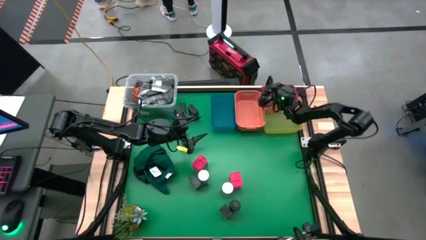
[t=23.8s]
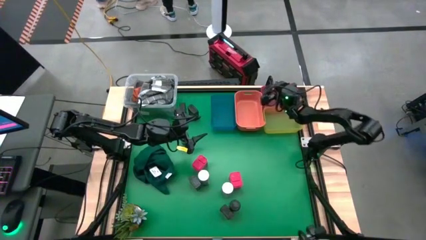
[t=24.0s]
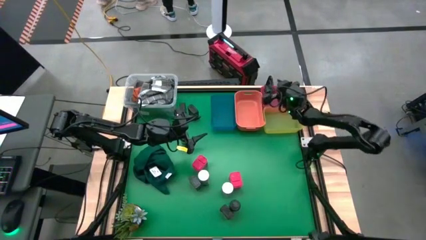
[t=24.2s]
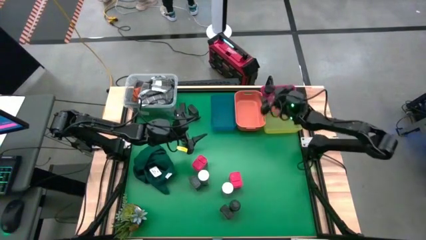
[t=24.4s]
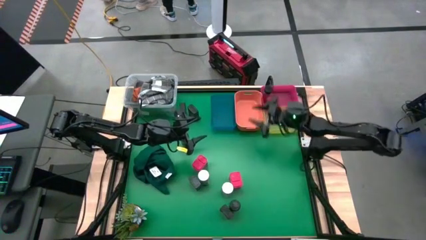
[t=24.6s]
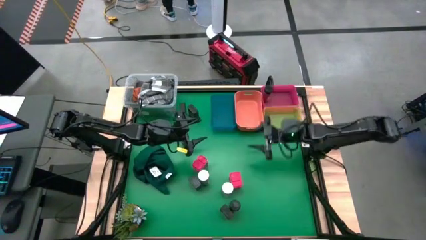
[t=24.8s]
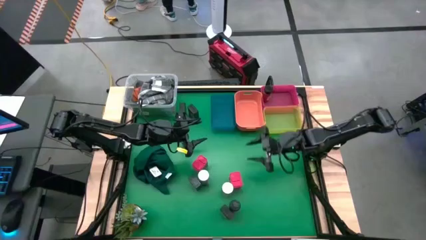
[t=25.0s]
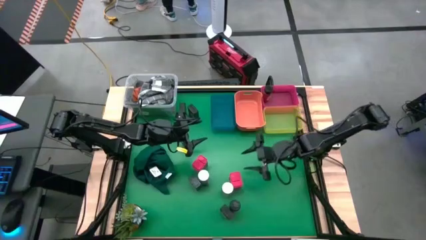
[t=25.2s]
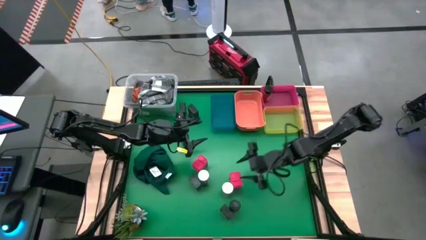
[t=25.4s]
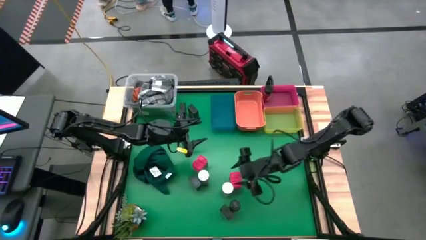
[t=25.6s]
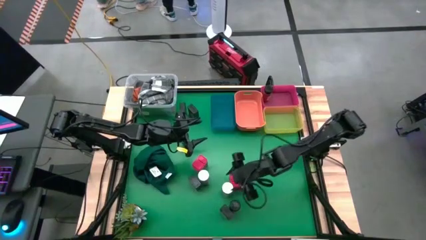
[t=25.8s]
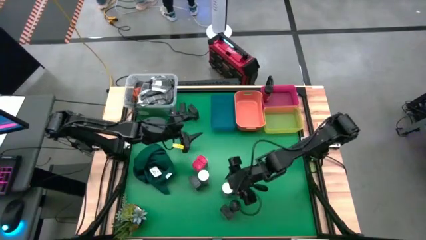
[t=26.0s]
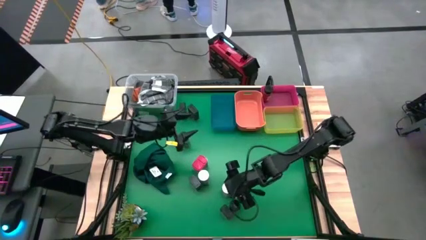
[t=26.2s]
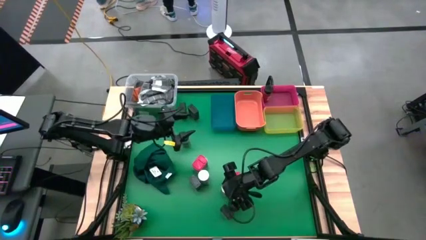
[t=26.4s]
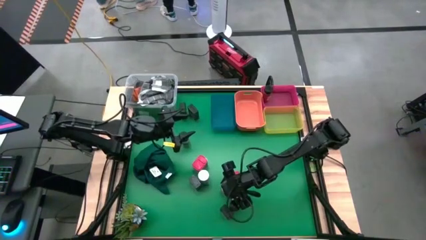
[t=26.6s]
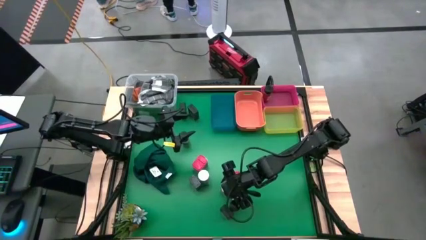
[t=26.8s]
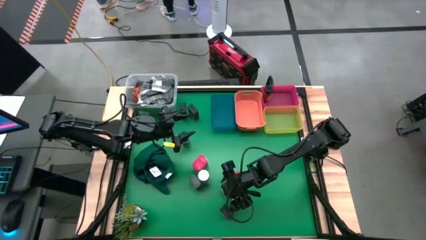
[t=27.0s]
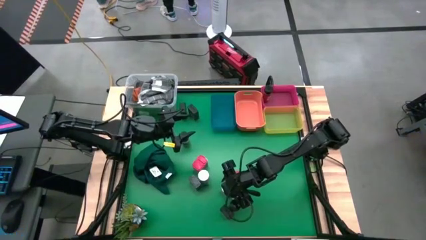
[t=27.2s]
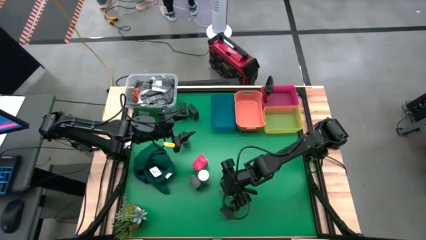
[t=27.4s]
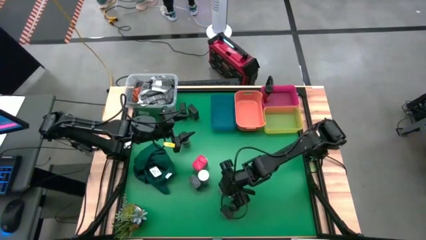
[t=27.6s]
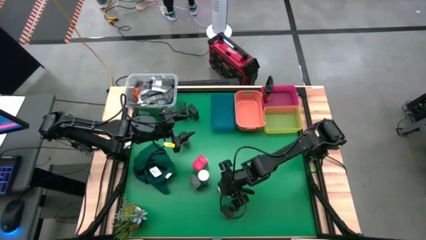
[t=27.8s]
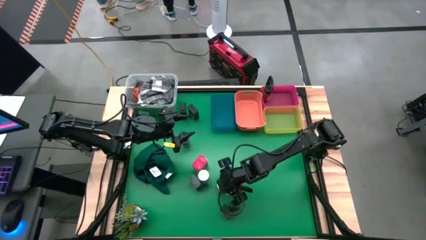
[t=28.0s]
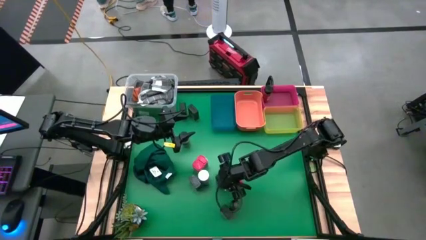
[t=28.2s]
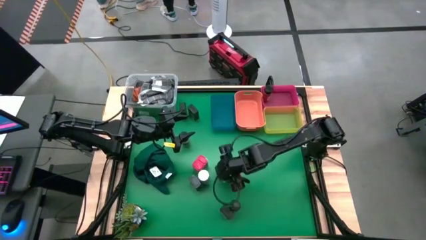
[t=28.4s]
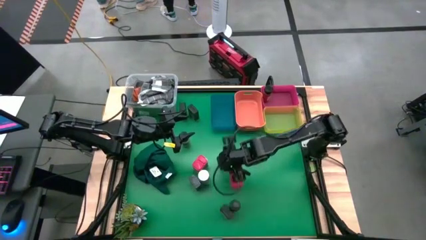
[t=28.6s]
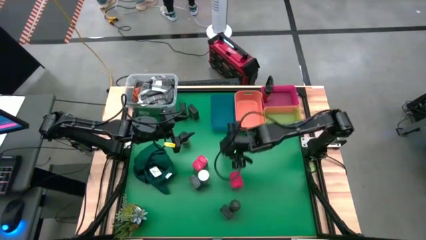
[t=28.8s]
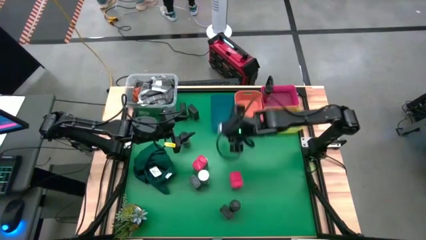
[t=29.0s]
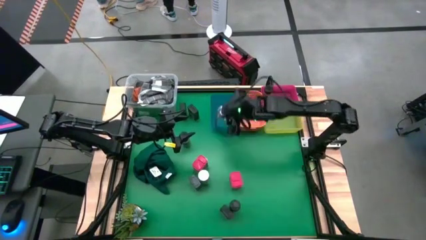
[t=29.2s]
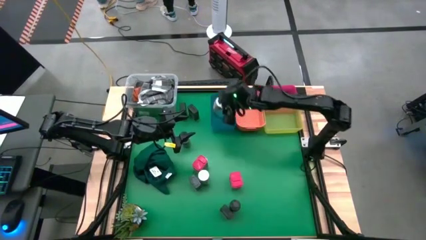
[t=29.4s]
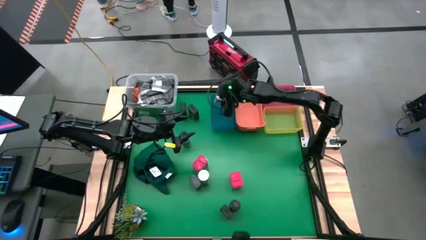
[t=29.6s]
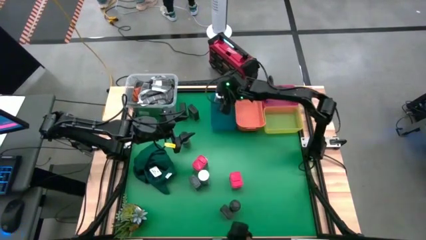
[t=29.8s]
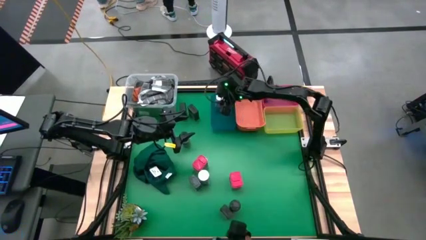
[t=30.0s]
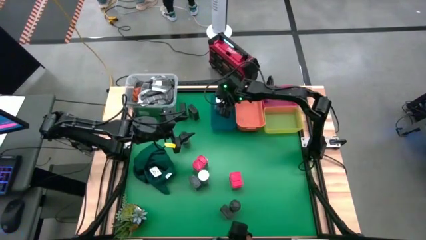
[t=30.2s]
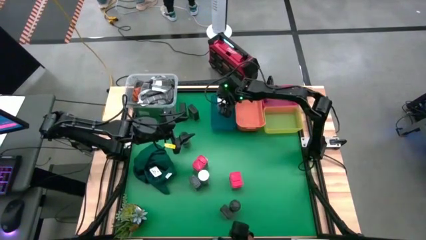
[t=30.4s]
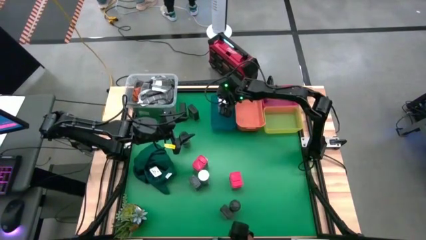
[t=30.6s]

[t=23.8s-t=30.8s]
Task: Sort spices by type
Put the bottom white seasoning bottle into the blue bin

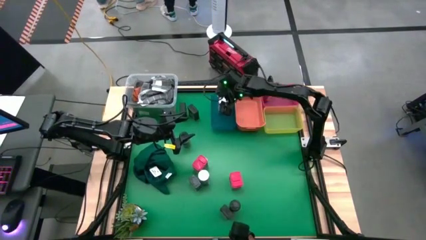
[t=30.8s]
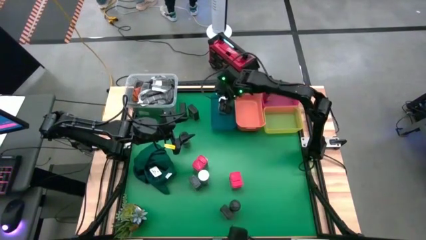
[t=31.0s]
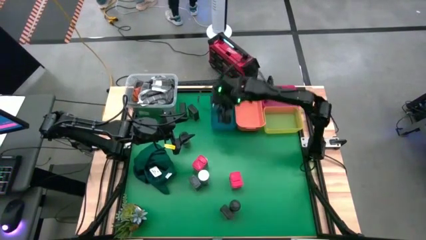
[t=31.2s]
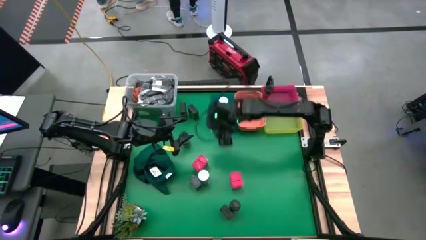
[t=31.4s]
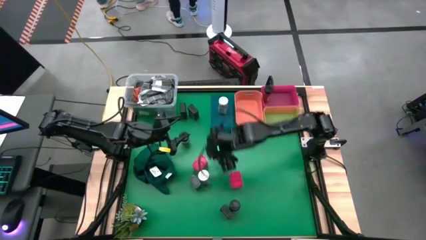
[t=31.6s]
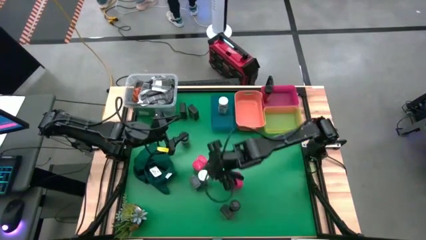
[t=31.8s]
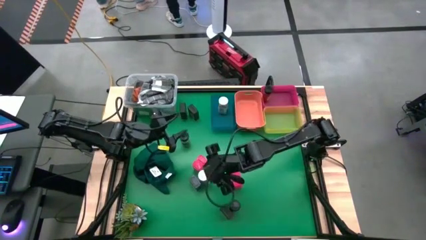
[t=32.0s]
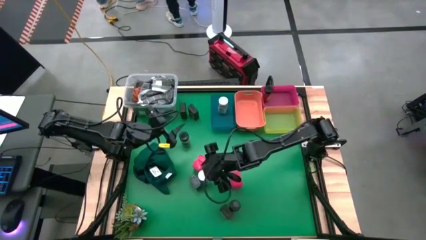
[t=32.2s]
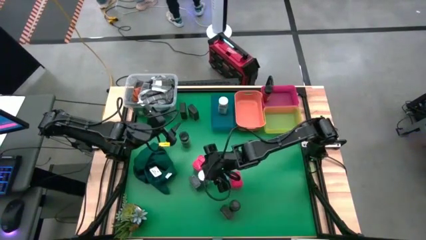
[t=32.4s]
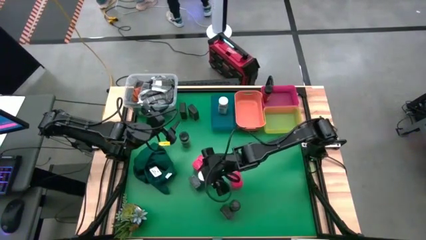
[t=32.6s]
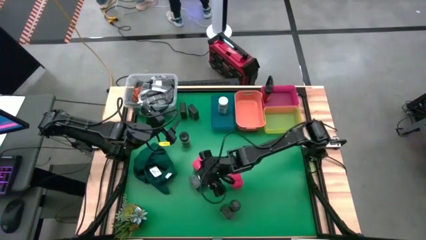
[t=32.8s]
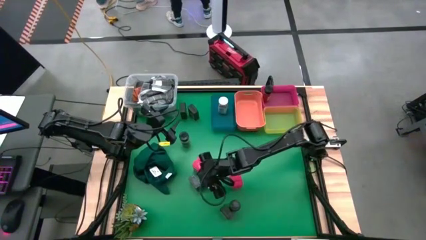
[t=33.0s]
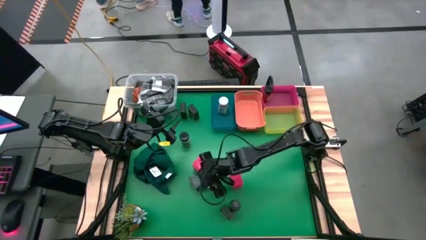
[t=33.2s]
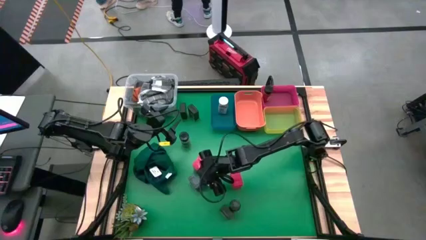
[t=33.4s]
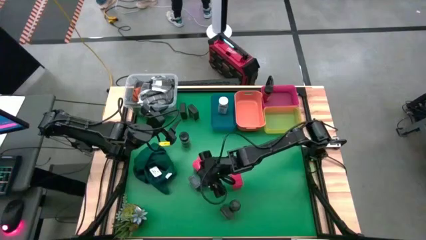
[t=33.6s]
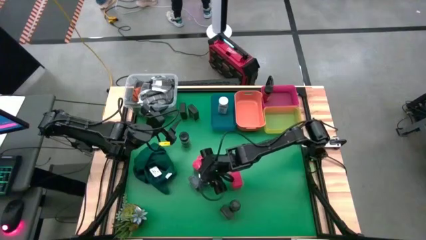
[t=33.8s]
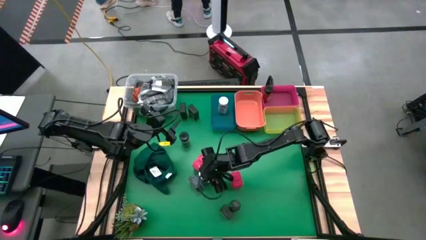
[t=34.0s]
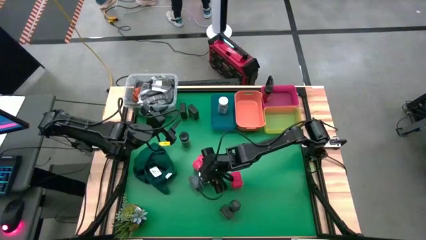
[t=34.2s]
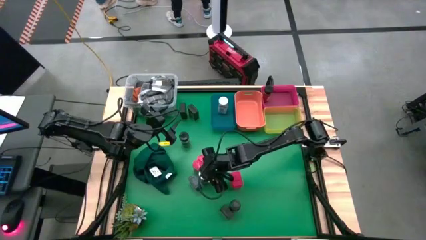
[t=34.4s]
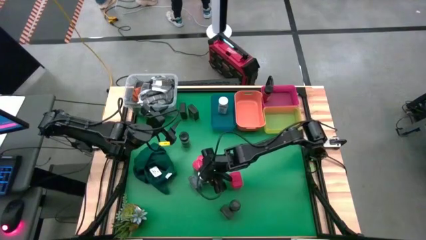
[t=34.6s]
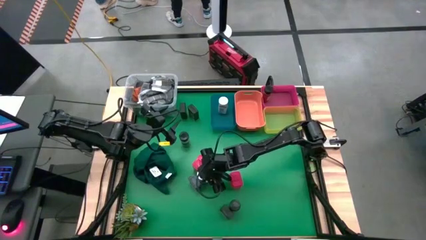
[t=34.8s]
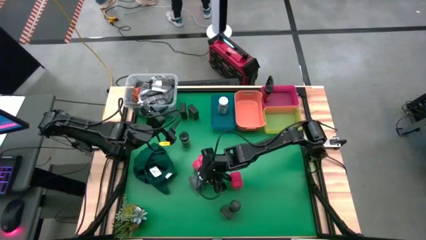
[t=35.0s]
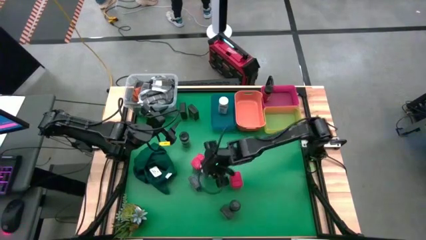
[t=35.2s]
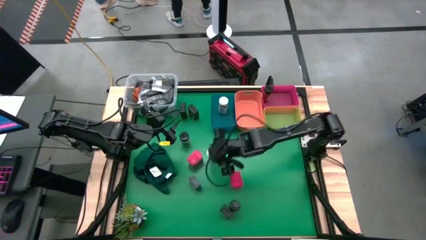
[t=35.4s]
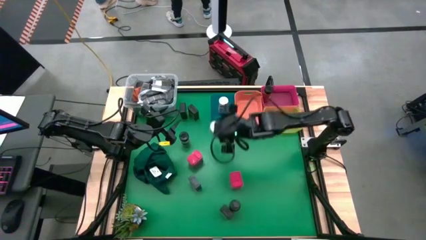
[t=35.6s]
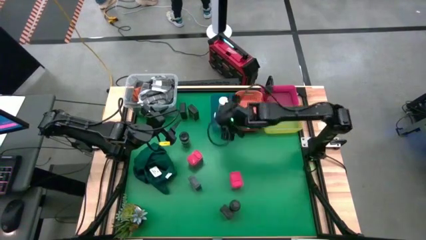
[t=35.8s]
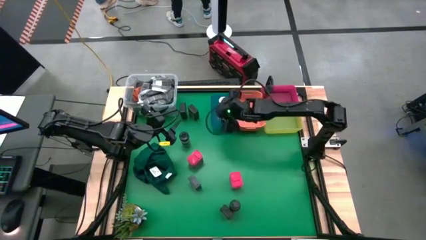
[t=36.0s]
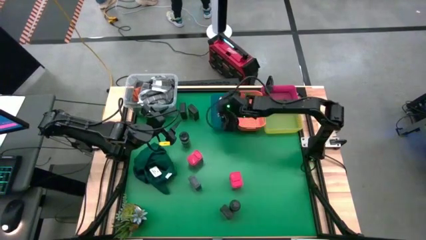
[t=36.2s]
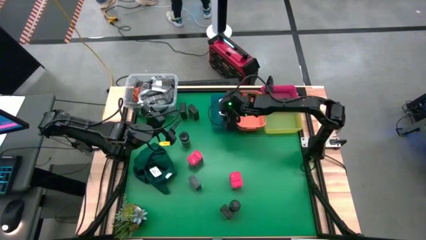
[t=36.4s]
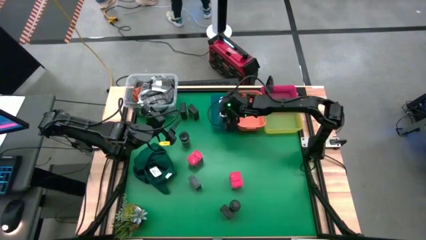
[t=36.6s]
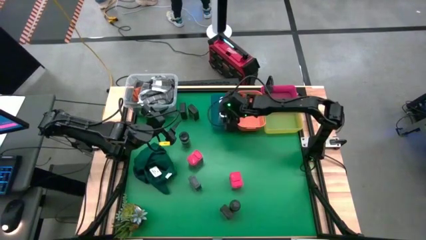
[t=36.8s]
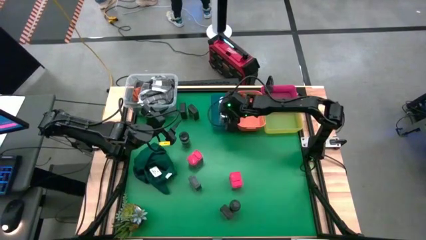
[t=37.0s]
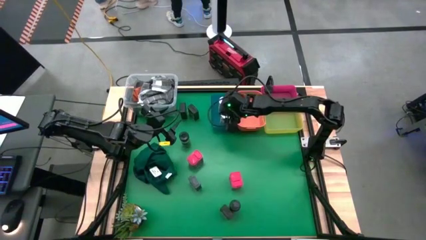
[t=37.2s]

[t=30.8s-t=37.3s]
Put the white seasoning bottle into the blue bin

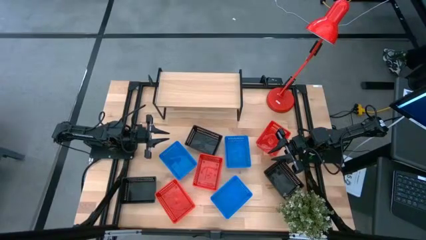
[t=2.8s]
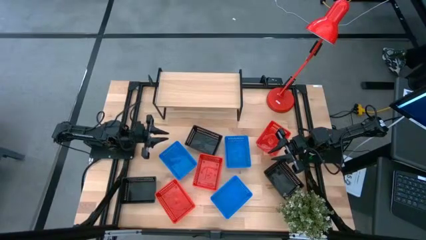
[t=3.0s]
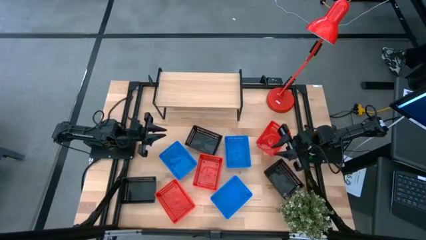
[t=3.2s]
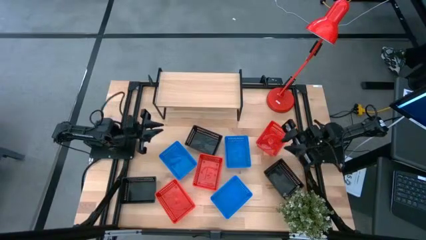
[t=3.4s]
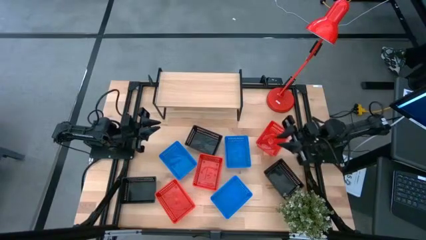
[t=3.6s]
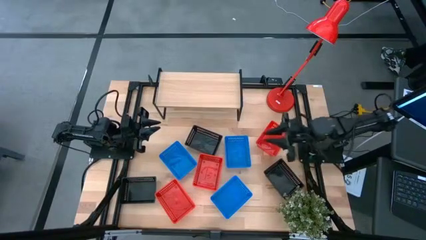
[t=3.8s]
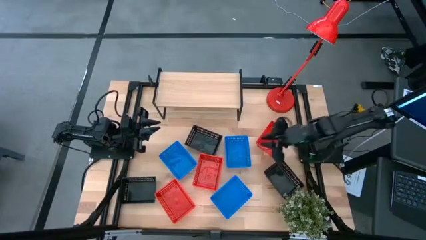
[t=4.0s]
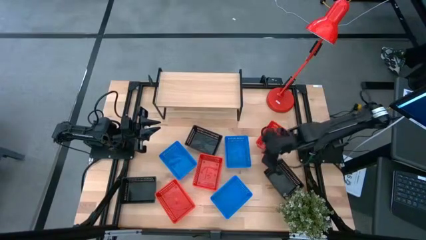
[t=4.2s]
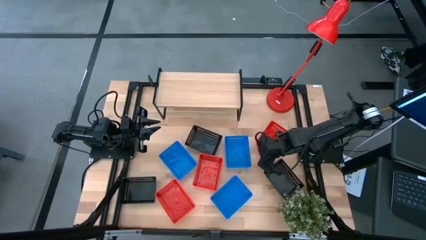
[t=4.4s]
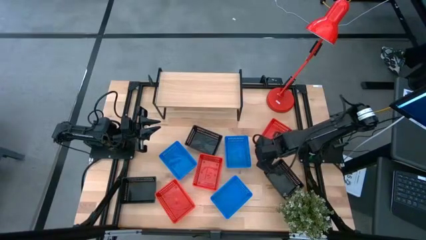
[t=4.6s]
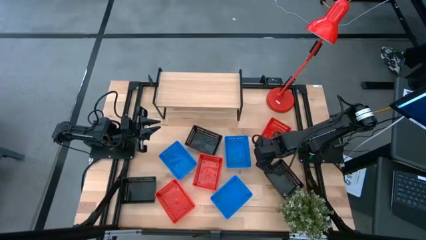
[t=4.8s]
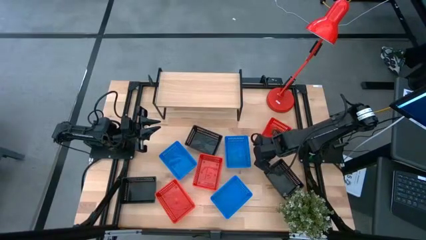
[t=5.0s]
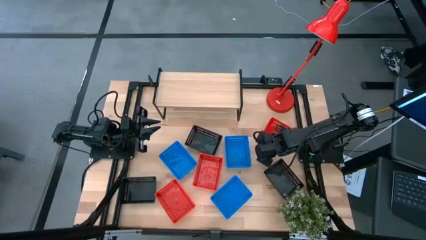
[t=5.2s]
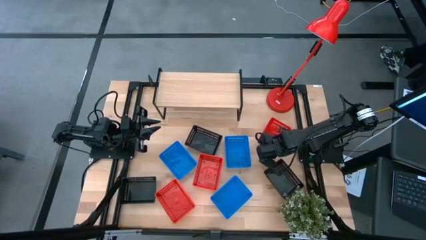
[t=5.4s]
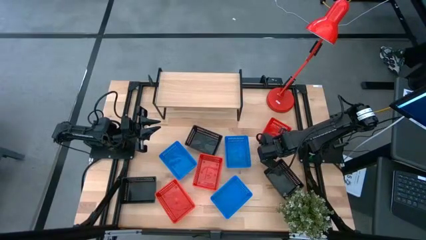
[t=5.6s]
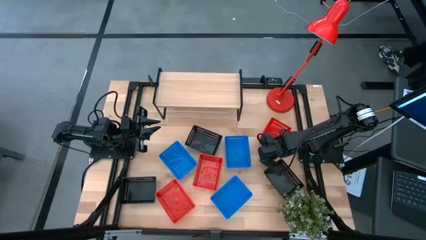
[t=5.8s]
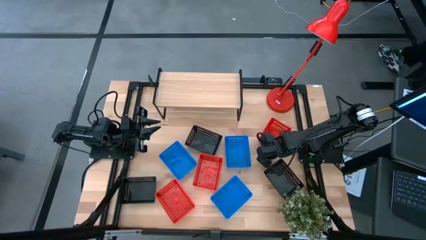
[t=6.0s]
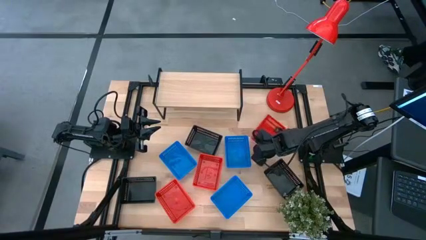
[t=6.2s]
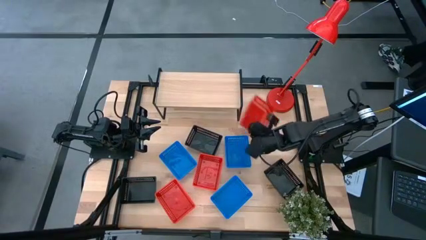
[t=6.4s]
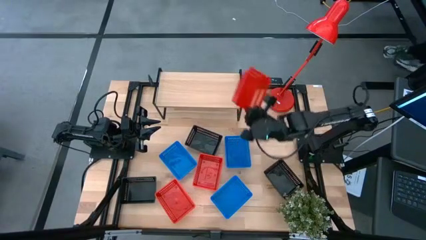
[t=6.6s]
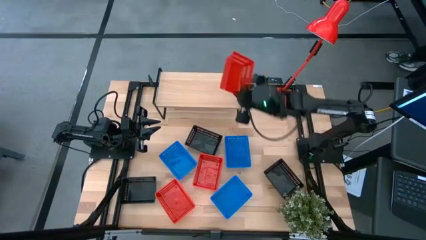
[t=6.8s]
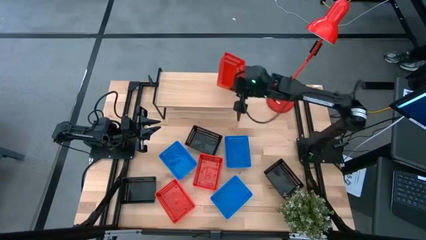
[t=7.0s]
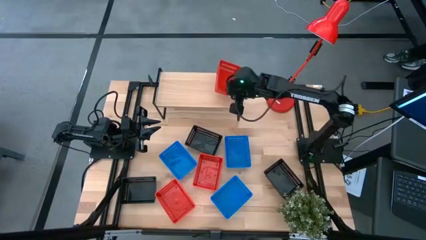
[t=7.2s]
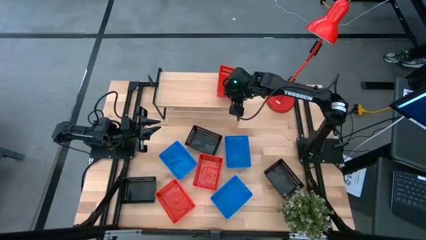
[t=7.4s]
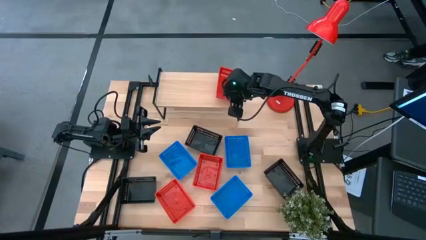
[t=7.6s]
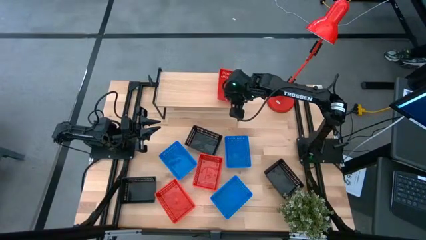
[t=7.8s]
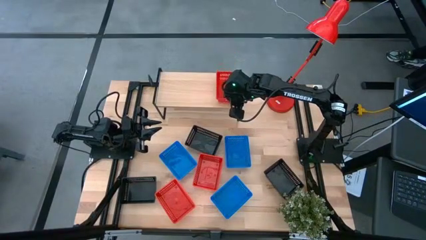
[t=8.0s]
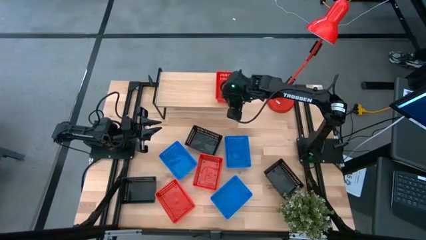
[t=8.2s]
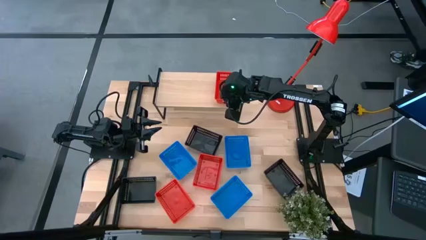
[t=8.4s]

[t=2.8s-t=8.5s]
Task: Stack baskets on shelf by color
Put the top red bin on the shelf
